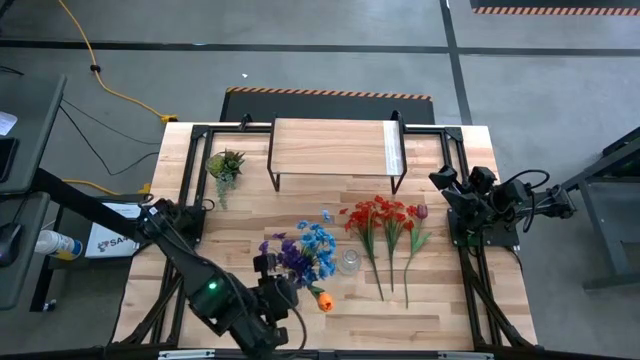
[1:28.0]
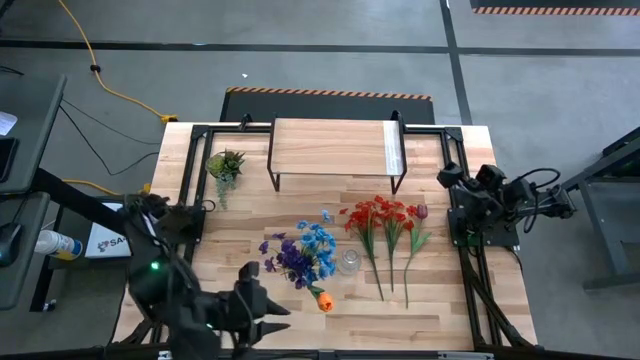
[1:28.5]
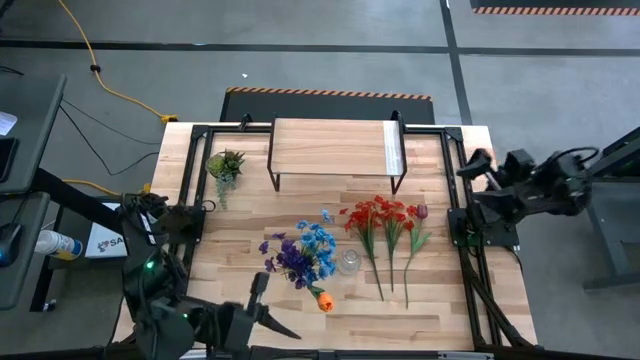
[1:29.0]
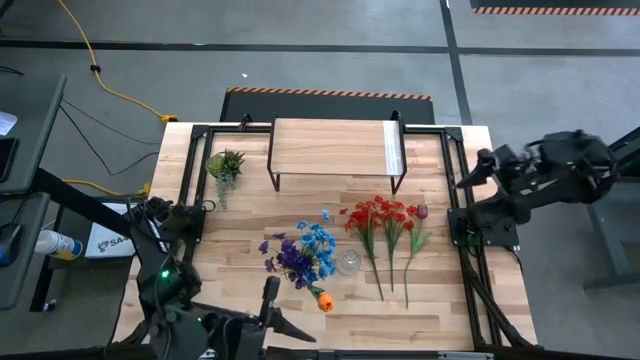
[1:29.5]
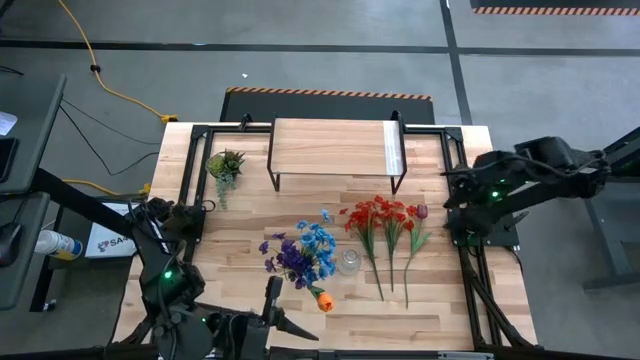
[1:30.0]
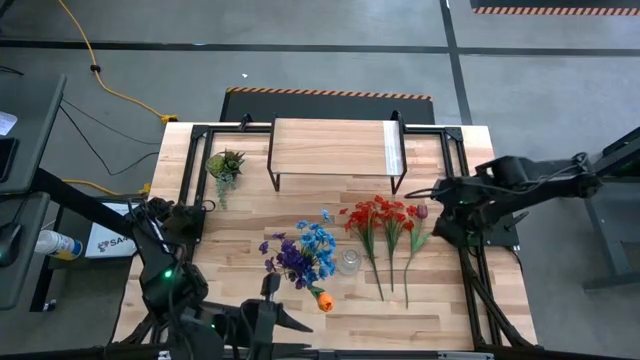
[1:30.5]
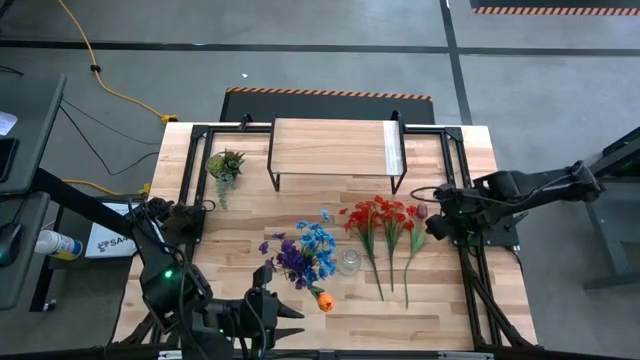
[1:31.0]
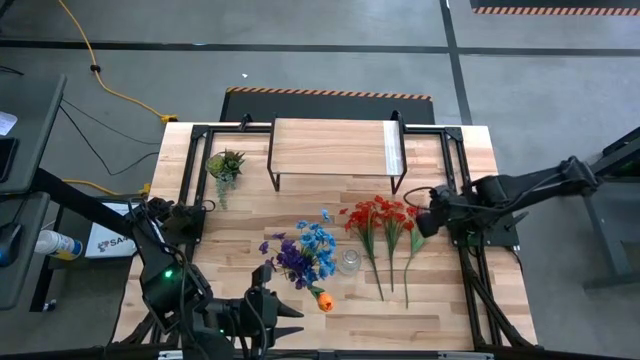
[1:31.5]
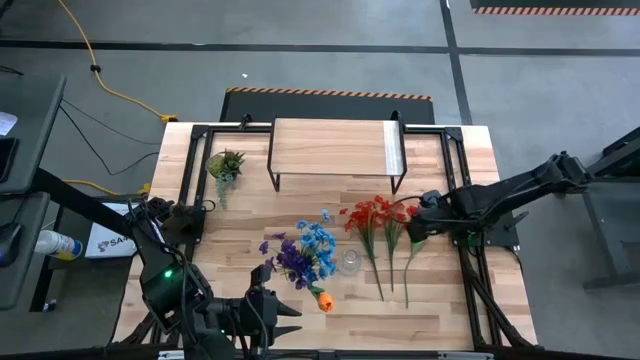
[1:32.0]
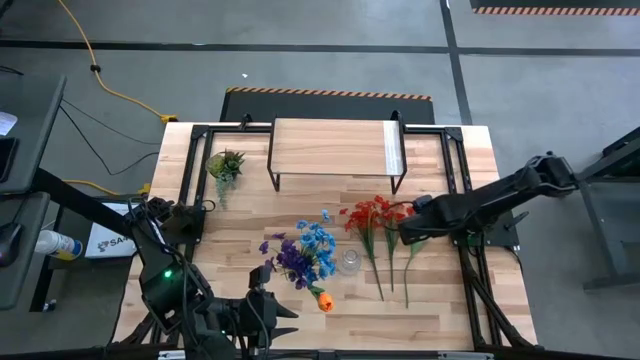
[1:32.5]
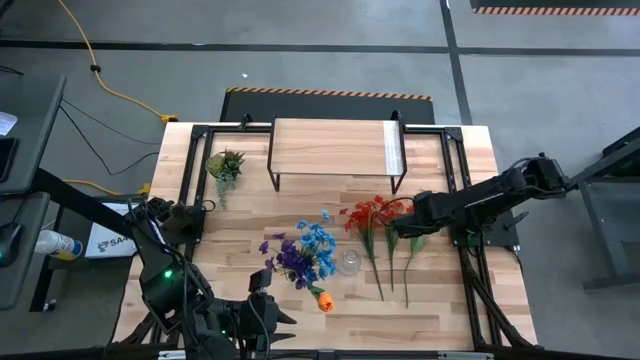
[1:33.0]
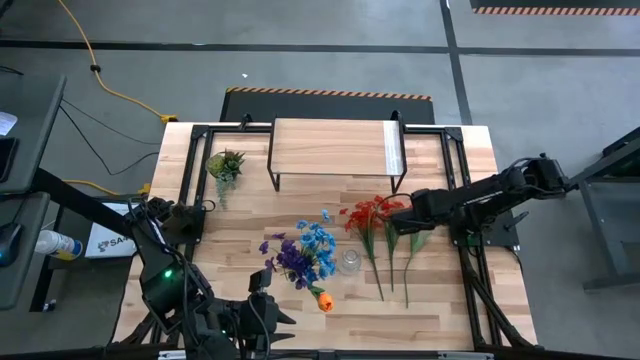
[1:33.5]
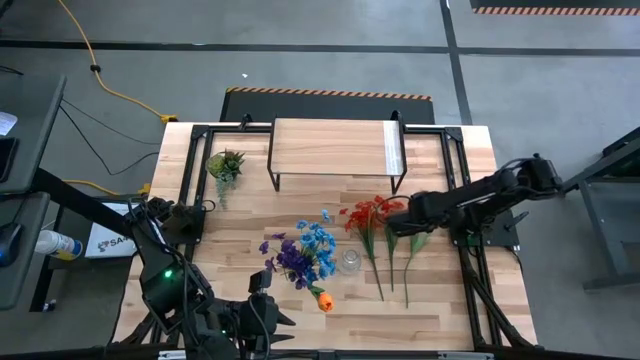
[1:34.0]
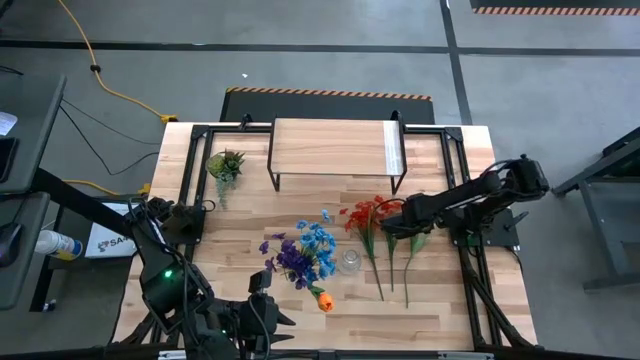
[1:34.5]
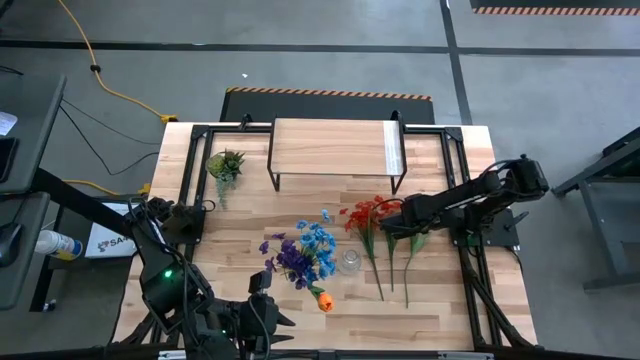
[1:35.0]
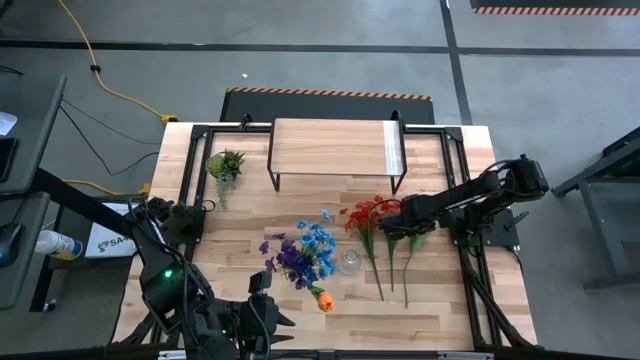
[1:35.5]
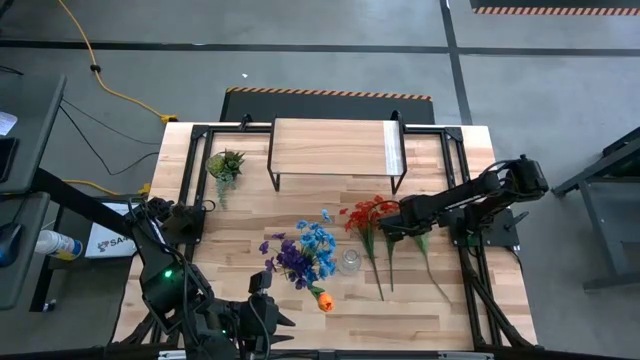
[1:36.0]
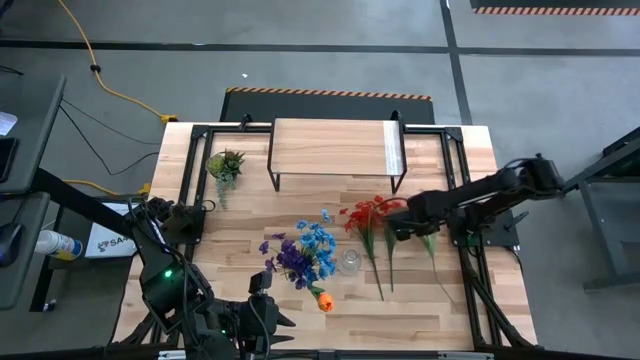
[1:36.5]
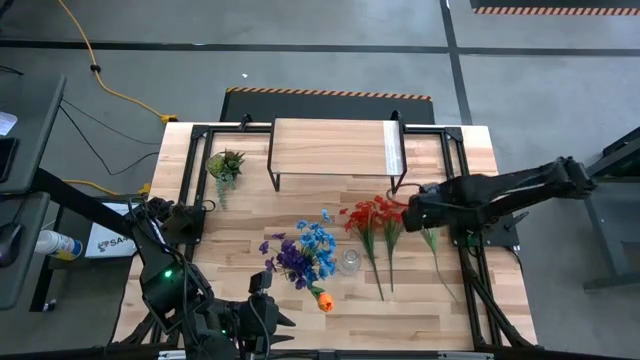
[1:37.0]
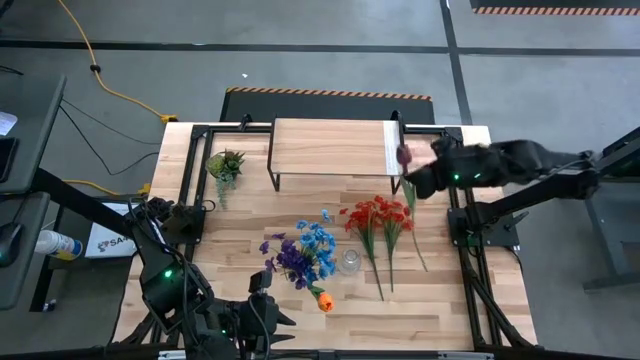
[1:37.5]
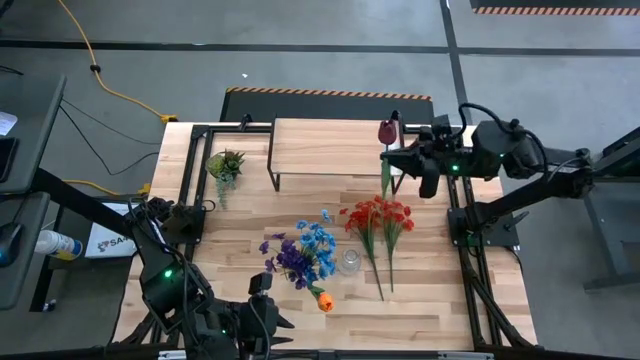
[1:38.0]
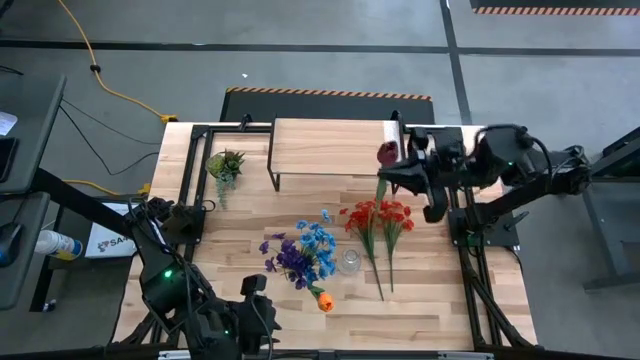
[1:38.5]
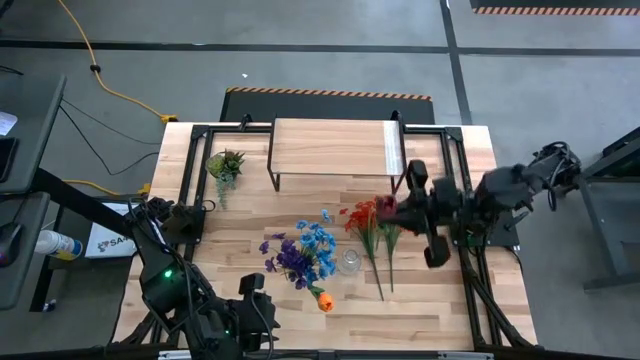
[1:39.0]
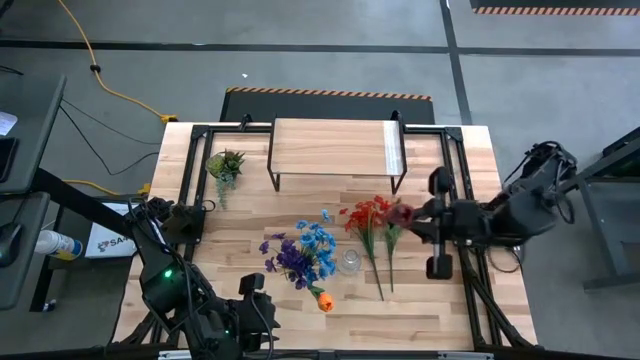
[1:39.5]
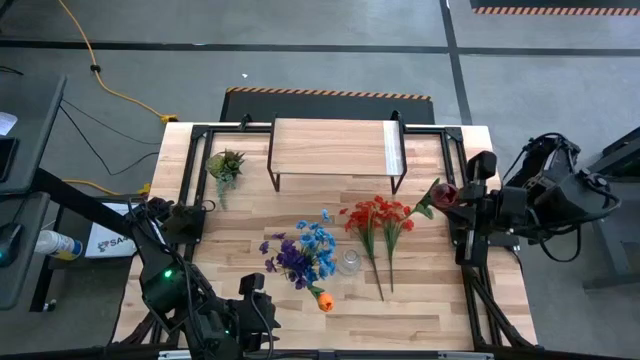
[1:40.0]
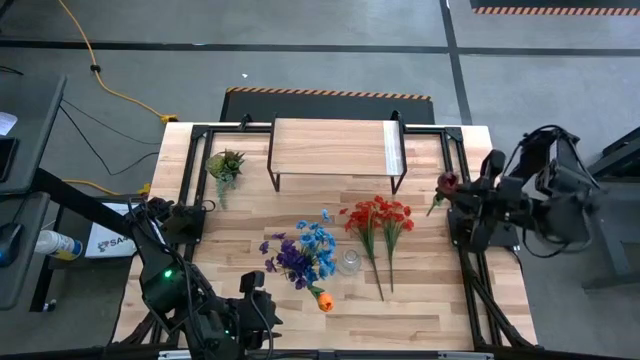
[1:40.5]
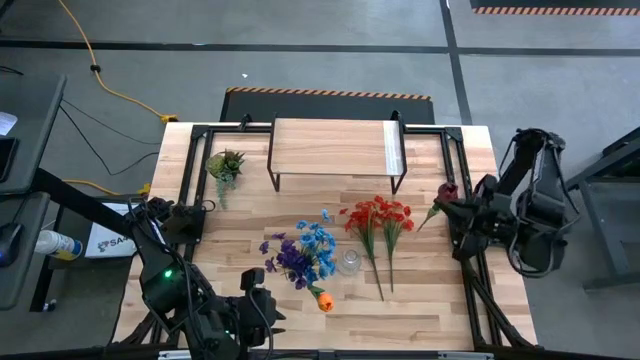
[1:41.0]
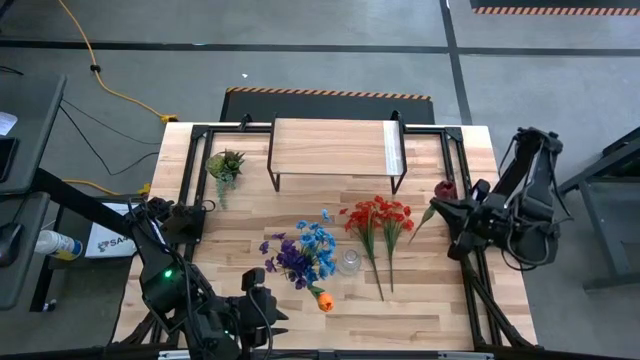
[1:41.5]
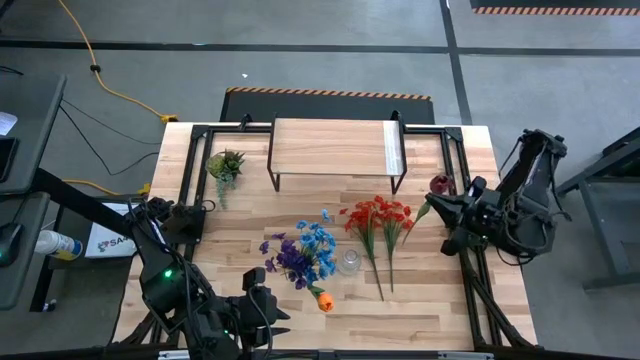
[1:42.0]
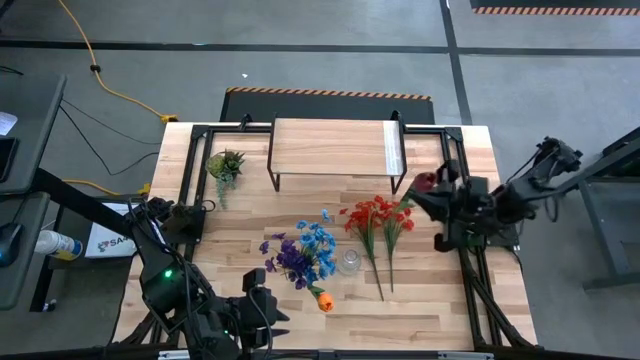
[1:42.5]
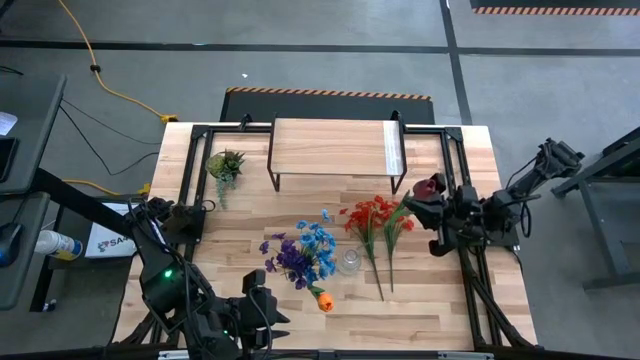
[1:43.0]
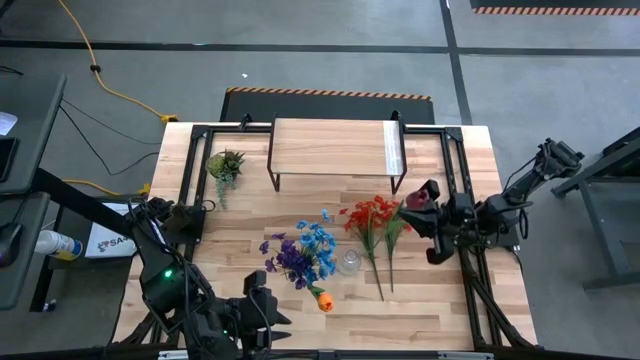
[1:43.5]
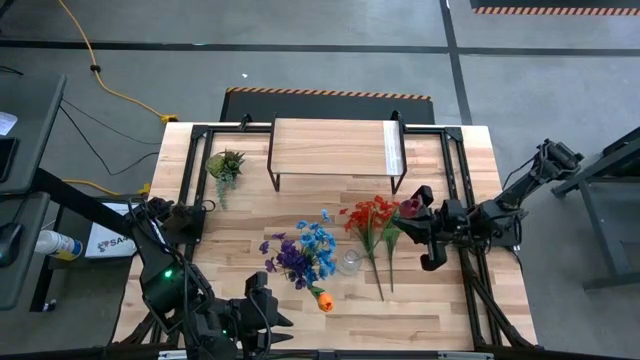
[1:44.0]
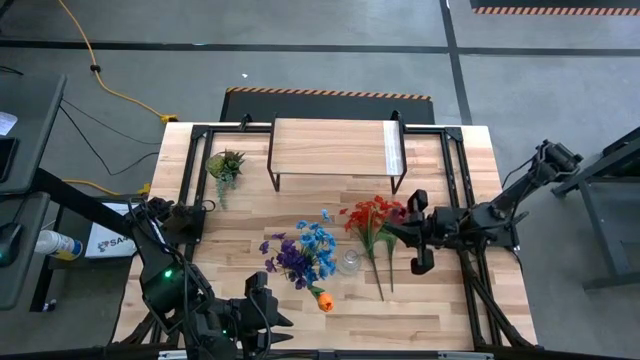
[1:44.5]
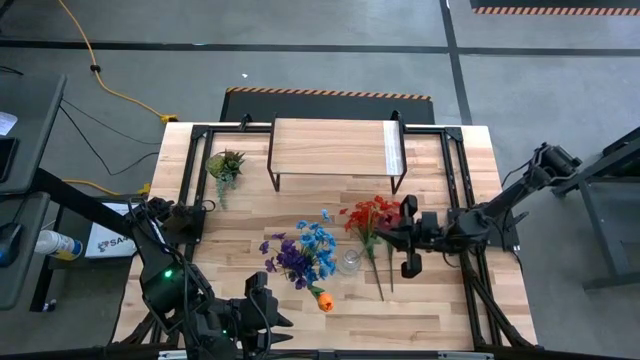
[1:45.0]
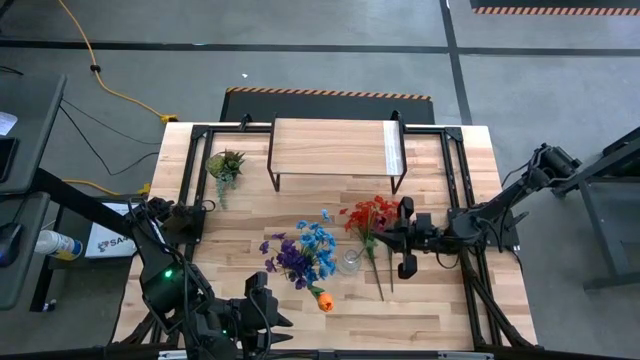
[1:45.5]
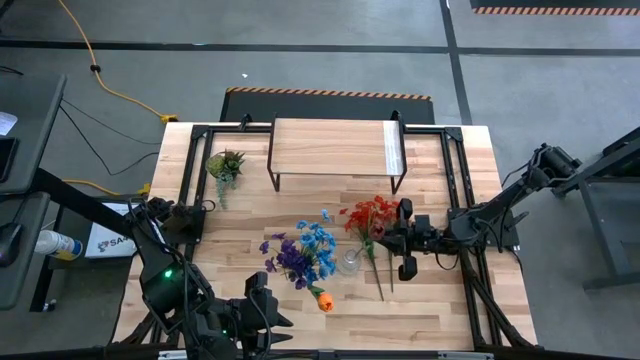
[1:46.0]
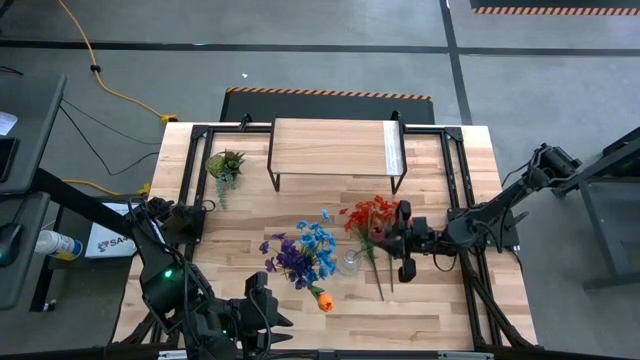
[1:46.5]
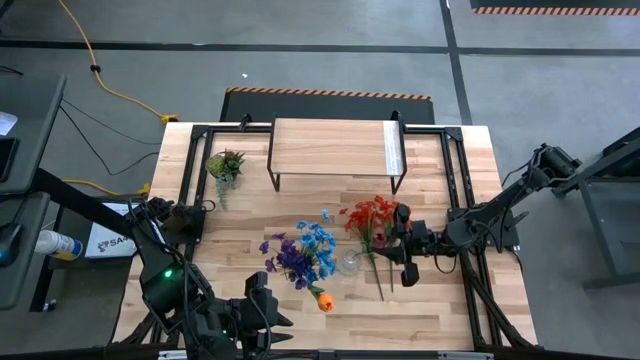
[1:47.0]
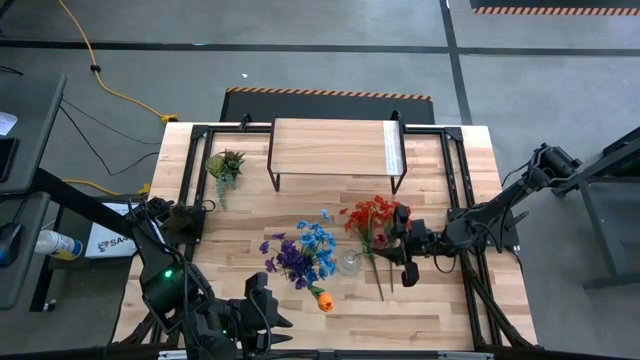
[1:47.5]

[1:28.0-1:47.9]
Task: Pick and place flowers into a vace then onto a shelf
Put the red flower into the right transparent flower vase

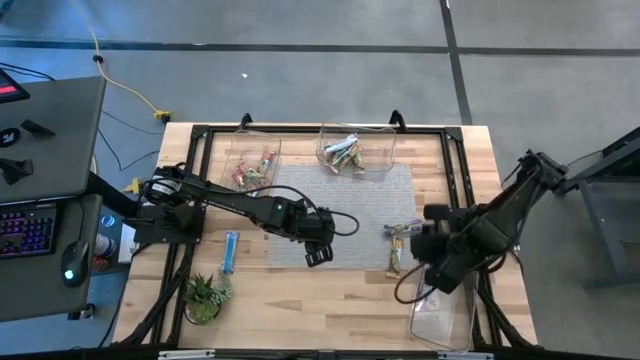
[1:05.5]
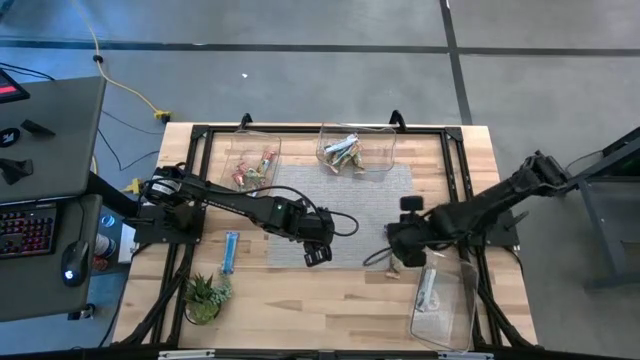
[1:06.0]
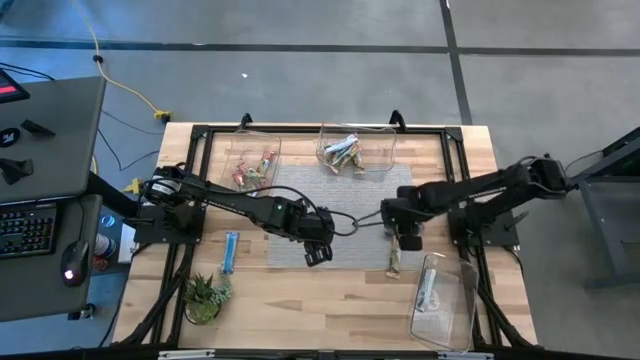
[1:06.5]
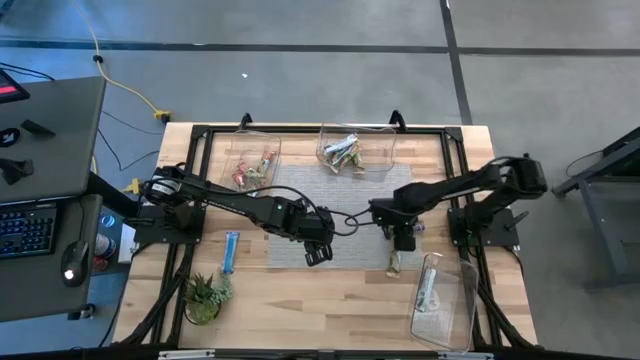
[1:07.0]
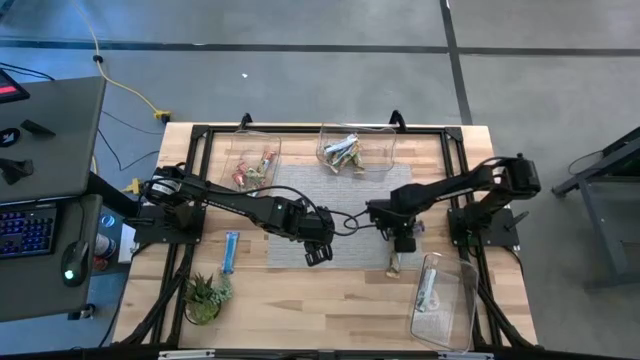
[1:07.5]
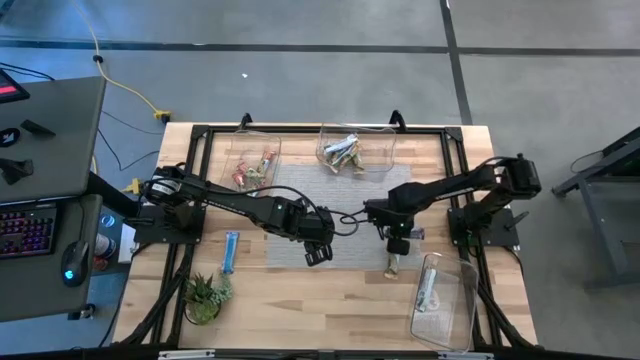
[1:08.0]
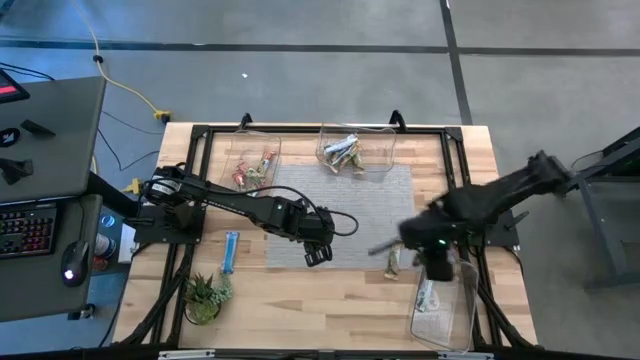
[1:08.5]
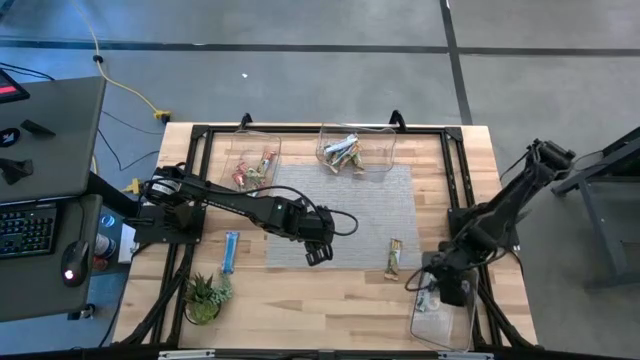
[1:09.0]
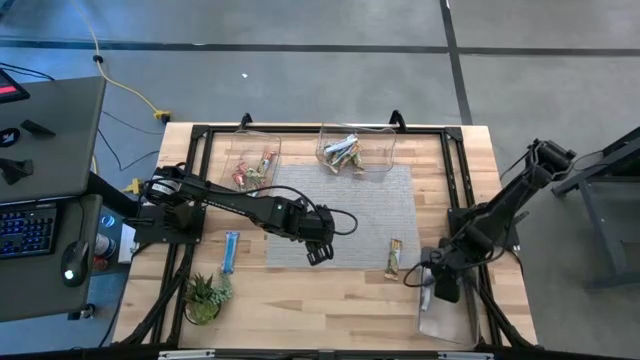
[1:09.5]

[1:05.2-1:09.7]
Task: Pick and place Granola Bars by type
Put the blue granola bar into the bottom transparent bin
